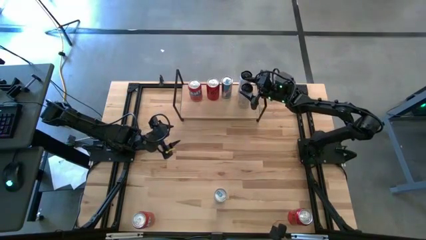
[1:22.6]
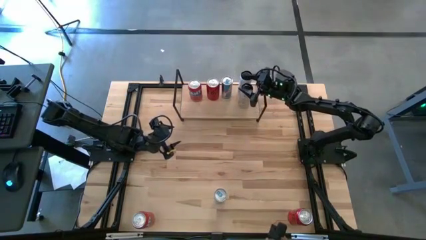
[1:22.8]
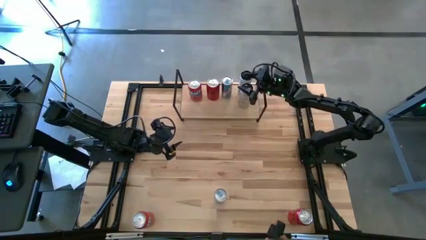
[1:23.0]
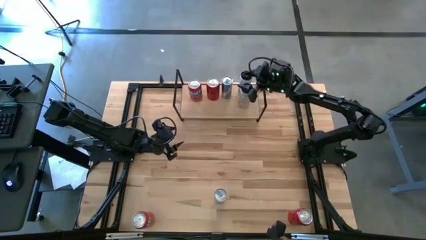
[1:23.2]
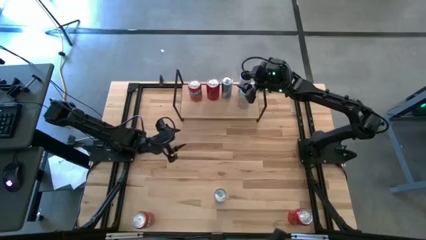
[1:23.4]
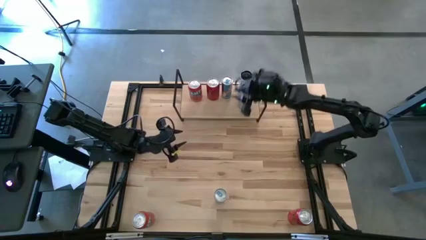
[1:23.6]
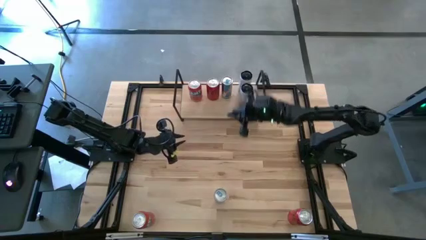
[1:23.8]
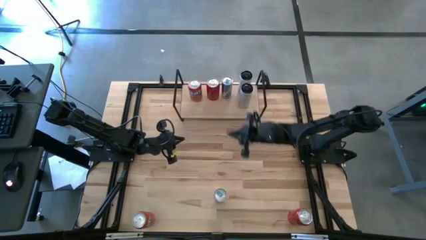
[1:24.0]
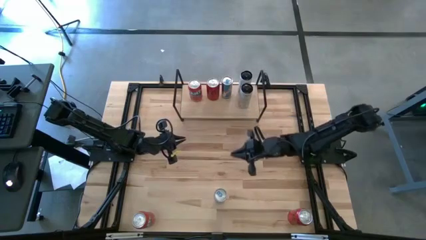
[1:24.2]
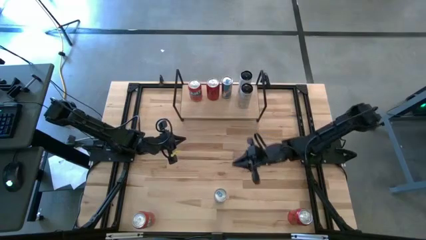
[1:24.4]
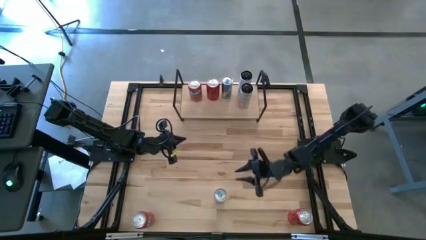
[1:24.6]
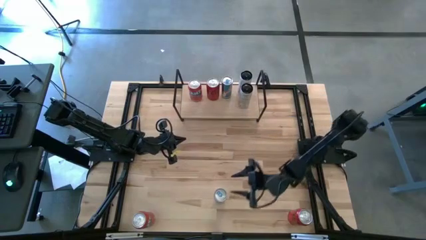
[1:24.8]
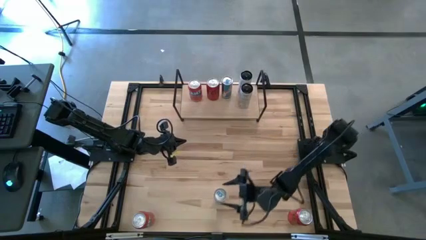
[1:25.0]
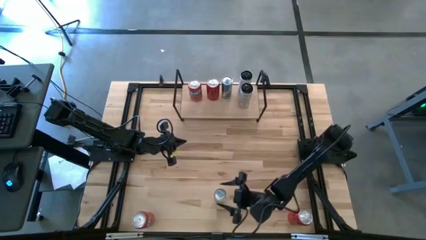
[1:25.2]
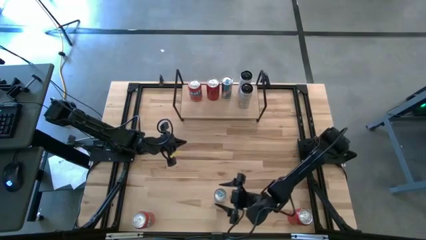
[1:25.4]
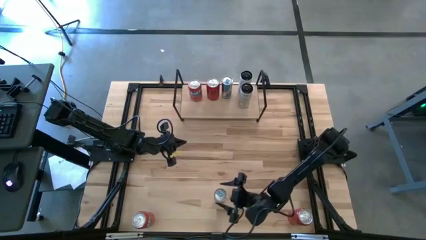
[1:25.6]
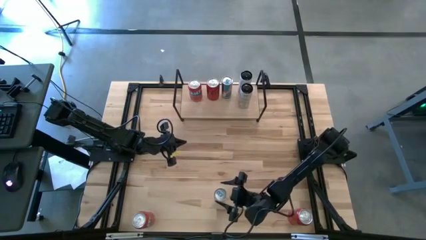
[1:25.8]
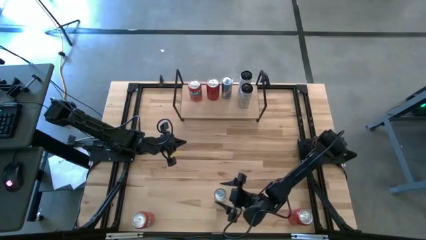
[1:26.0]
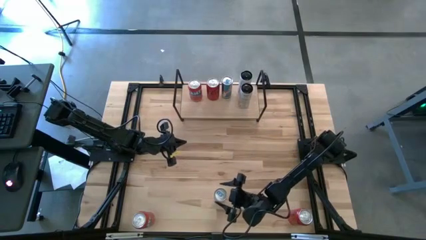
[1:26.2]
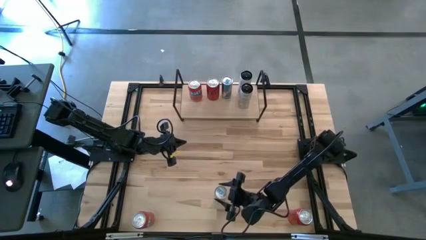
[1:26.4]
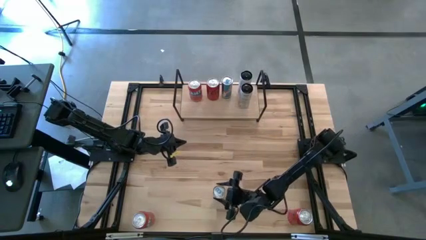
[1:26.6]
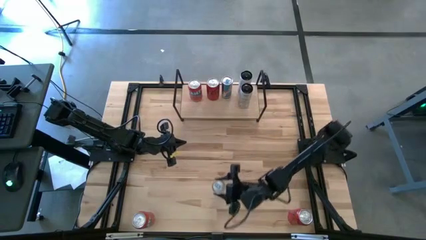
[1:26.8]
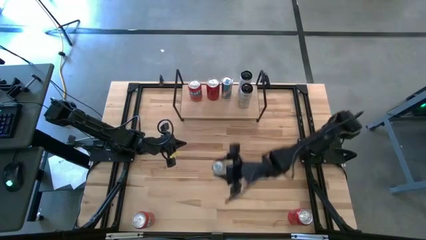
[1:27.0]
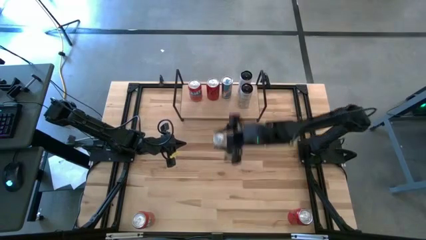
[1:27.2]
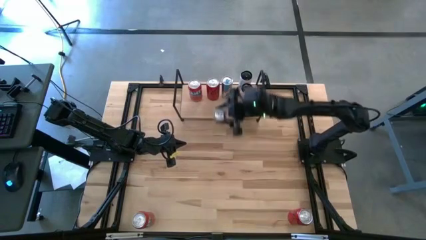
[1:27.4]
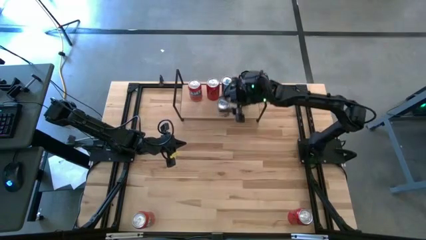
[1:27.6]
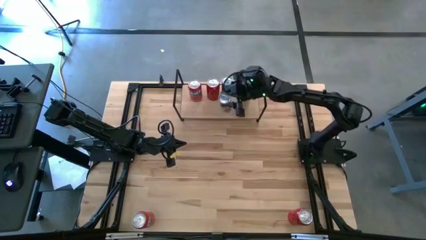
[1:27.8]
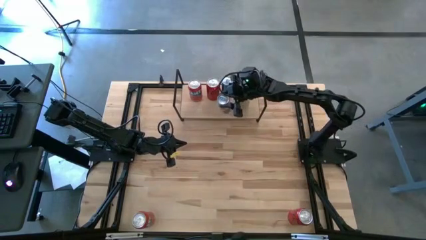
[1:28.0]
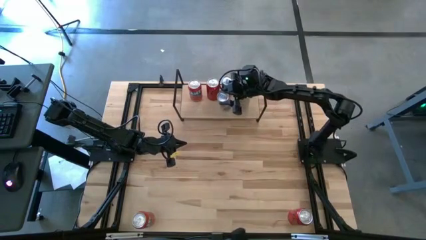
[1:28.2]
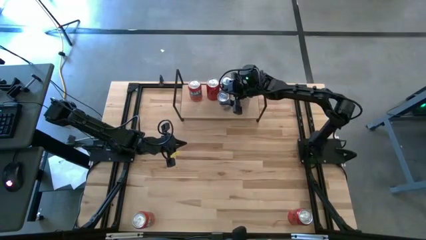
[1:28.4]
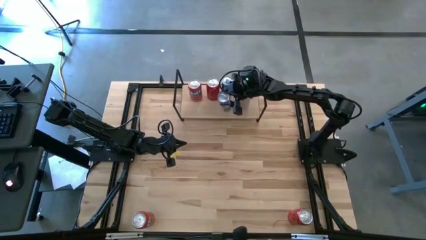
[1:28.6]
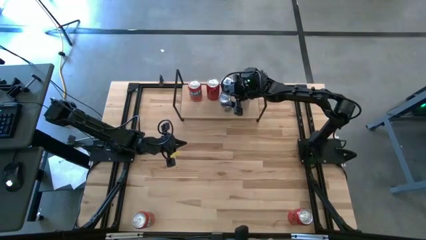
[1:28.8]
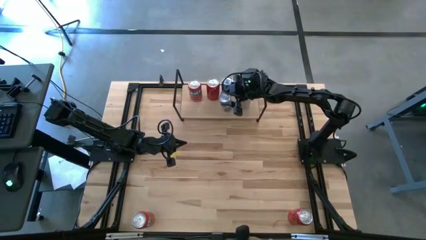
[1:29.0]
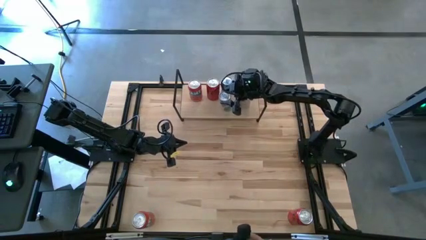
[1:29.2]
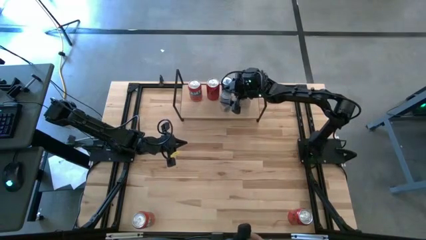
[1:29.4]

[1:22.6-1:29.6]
Task: Place canned beverage on shelf
Put the blue soda can on the shelf and align with the other blue soda can

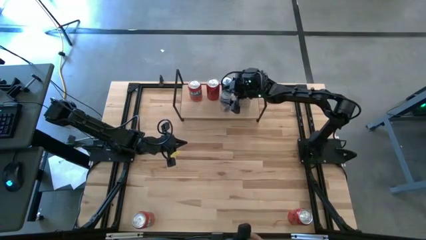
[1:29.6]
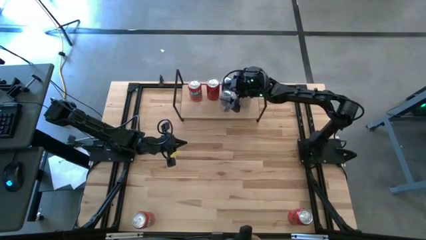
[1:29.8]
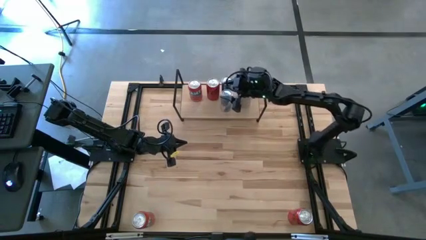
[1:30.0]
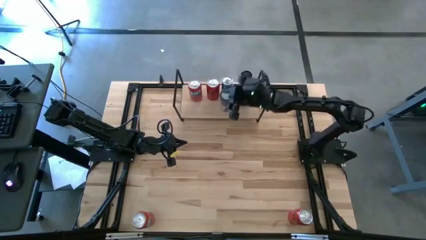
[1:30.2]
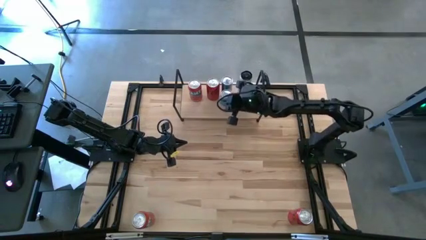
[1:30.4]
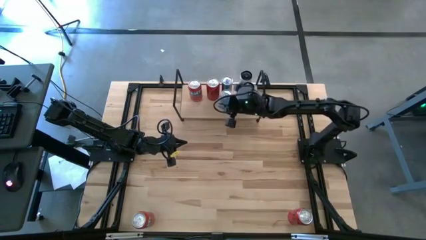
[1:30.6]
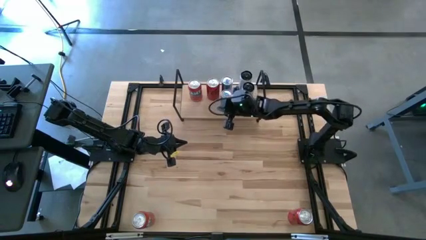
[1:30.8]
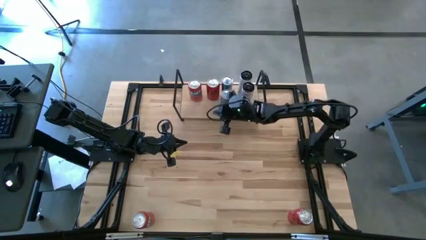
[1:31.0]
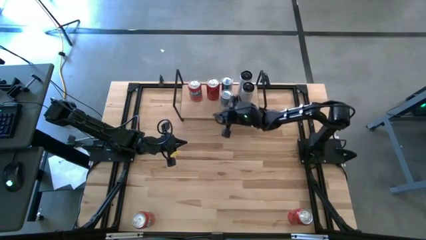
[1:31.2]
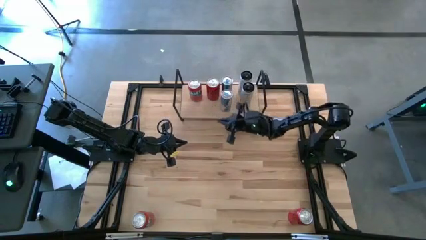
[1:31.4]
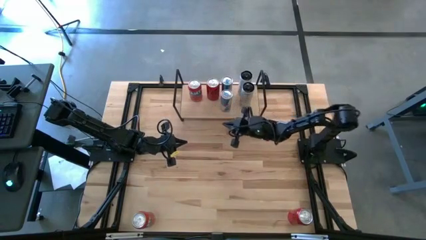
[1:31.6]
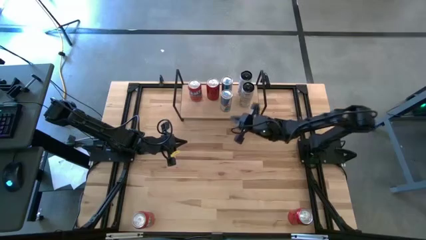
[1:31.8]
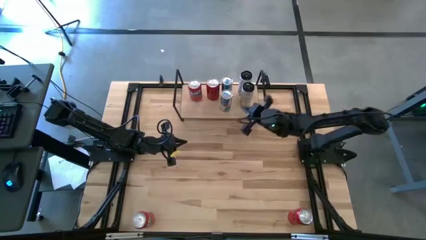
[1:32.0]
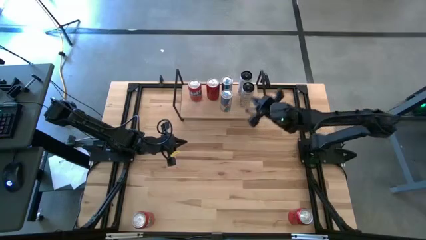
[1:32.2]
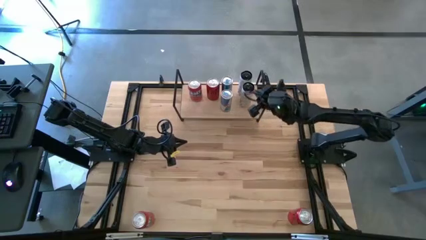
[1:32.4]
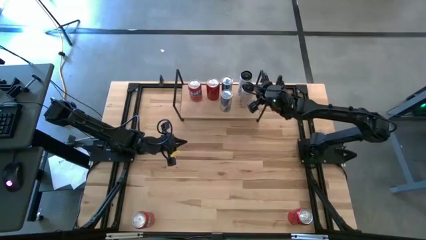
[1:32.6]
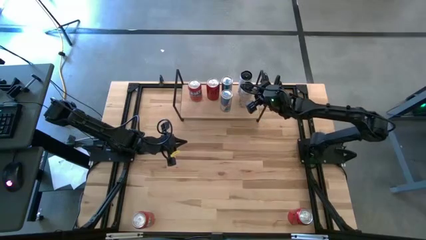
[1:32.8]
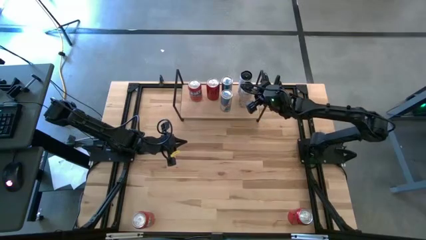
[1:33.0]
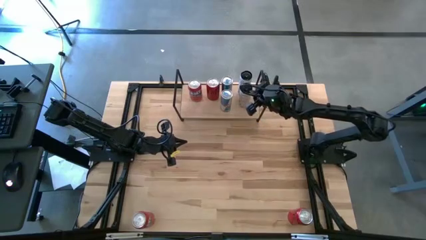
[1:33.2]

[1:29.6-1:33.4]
Adjust the white yellow soda can on the shelf

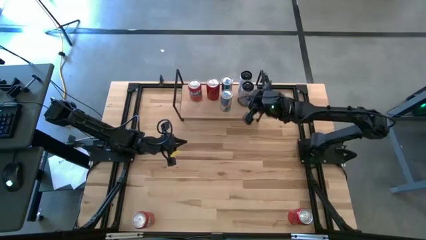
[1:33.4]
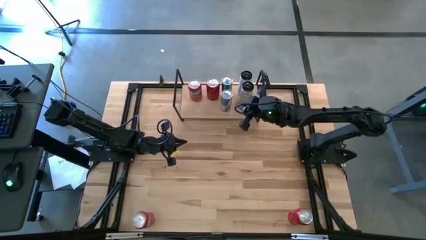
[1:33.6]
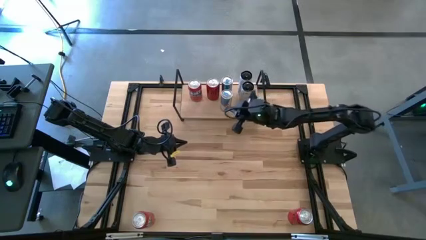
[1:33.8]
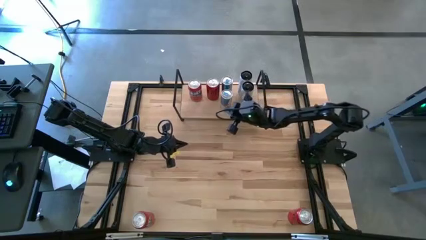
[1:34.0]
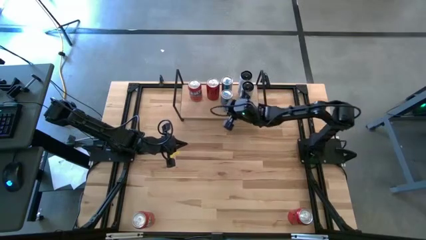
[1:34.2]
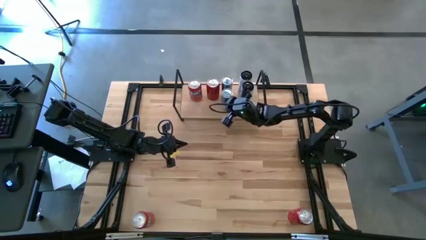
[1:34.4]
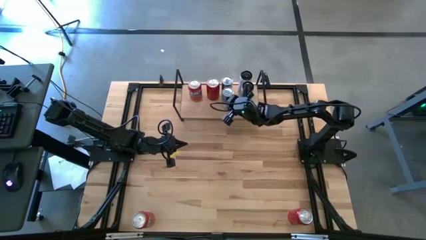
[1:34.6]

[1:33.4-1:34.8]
Adjust the blue soda can on the shelf

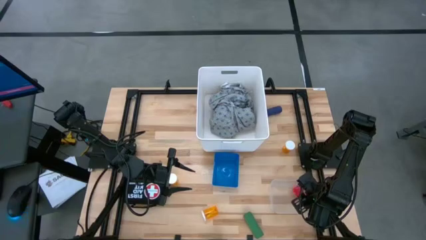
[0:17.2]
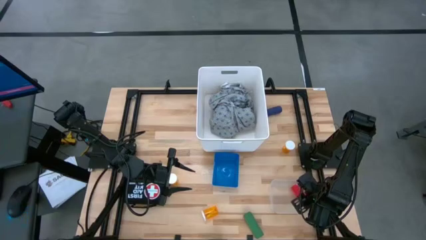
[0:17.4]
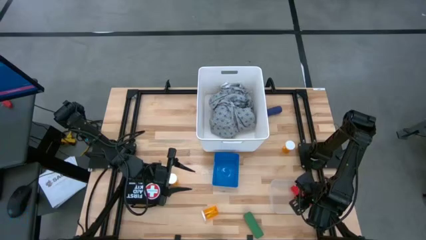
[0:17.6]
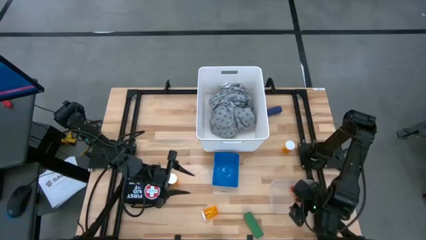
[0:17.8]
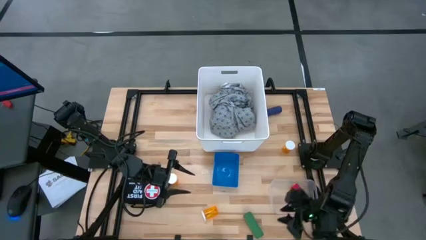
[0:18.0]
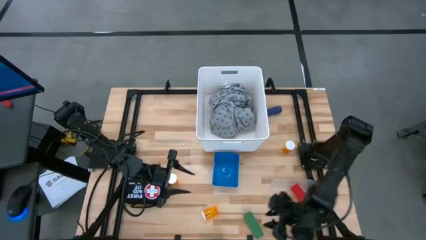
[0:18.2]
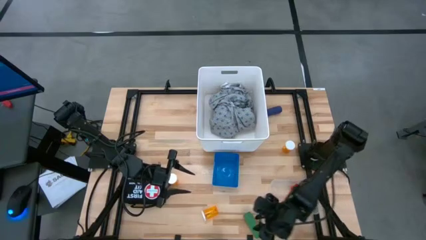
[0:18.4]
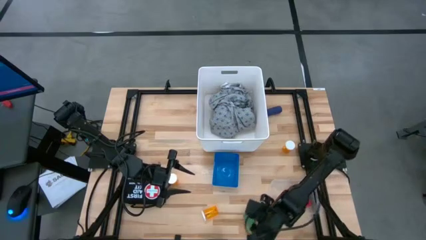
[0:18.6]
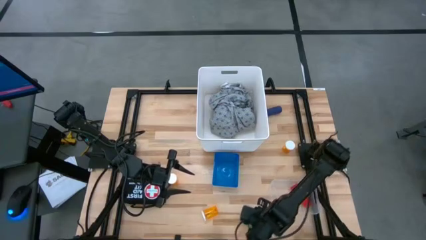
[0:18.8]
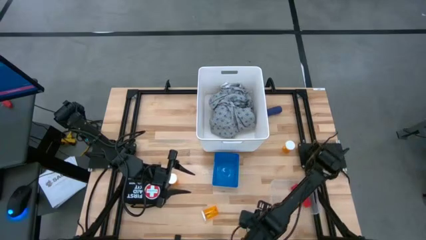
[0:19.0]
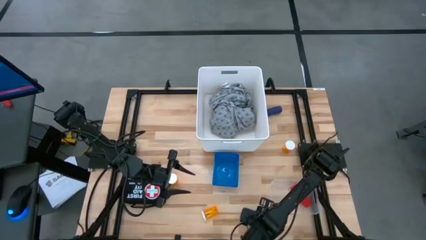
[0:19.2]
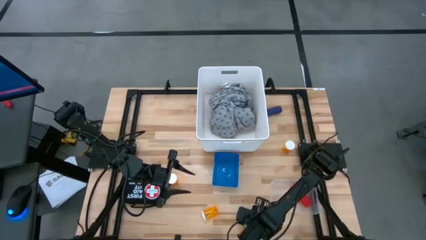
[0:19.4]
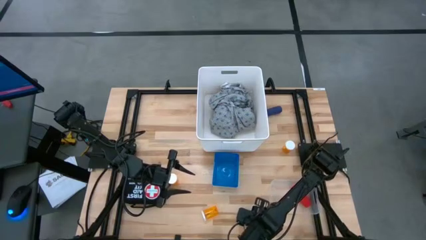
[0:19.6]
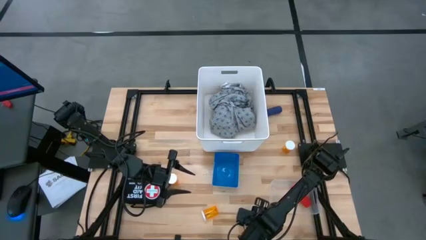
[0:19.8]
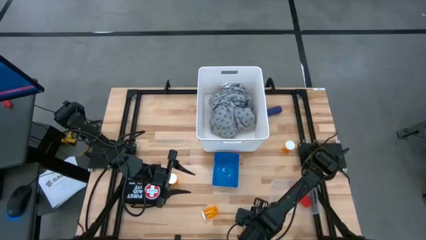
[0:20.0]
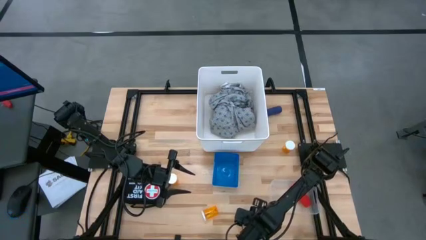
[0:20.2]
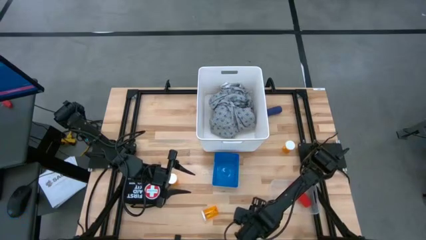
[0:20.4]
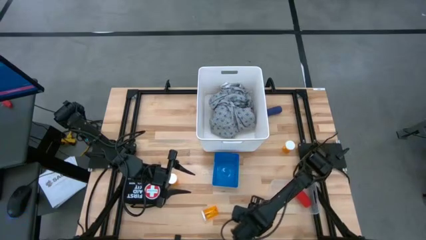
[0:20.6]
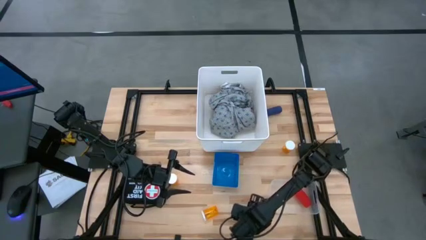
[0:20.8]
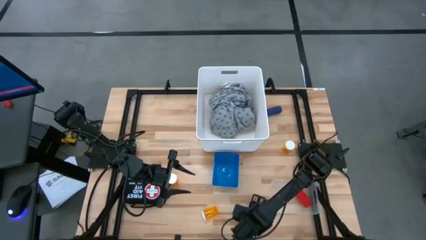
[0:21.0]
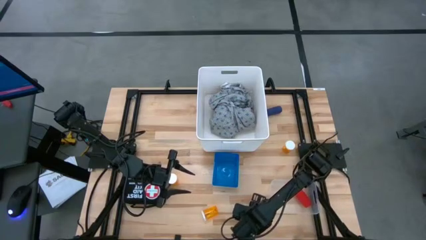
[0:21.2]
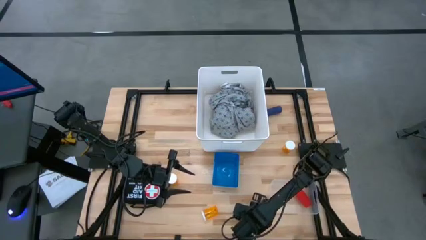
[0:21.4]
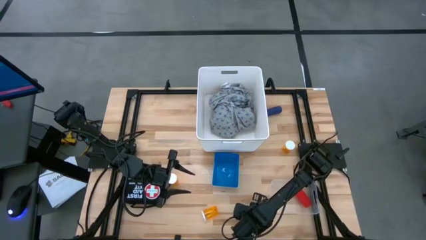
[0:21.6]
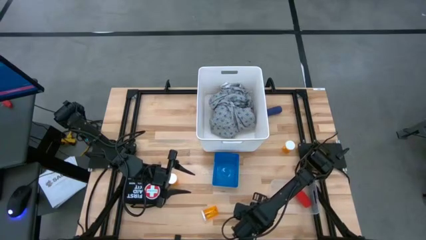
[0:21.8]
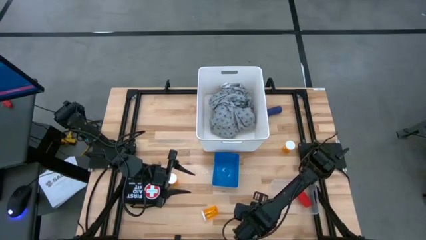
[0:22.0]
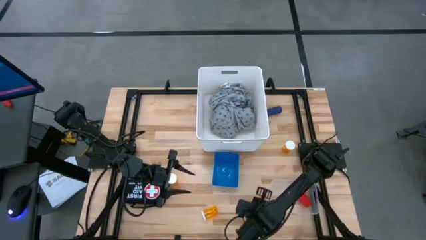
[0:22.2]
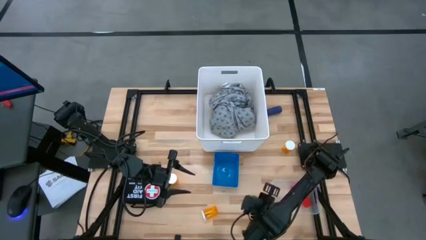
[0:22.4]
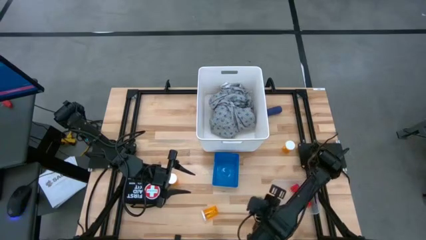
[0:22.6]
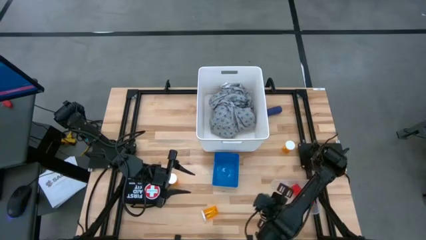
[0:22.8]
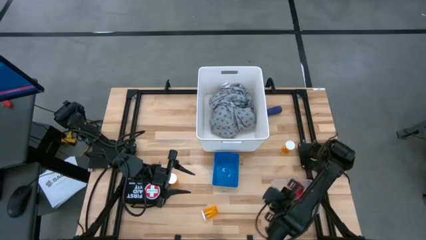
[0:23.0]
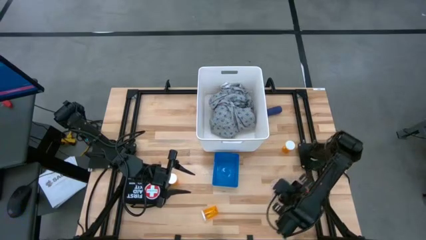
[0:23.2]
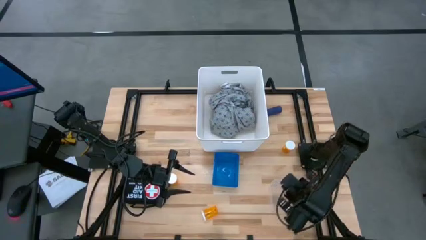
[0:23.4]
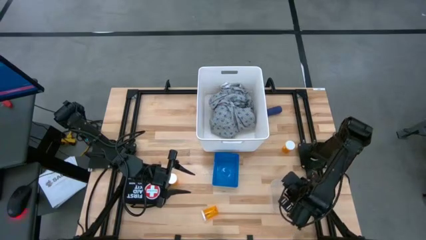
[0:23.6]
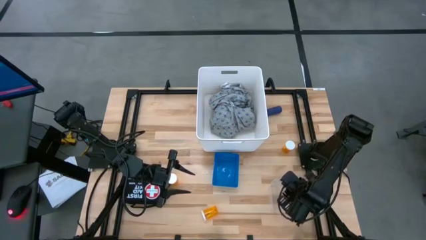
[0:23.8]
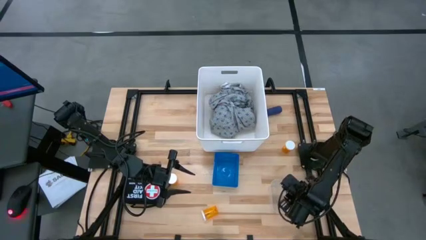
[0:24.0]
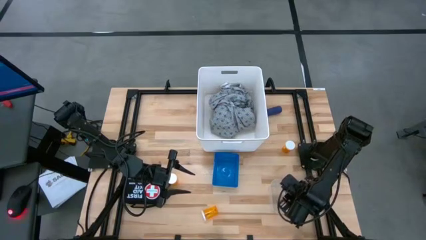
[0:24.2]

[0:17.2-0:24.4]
Task: Pick & place medical supplies in basket/bin
Put the green bandage into the transparent bin
